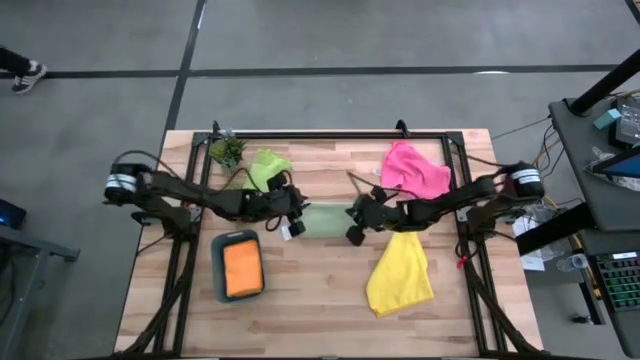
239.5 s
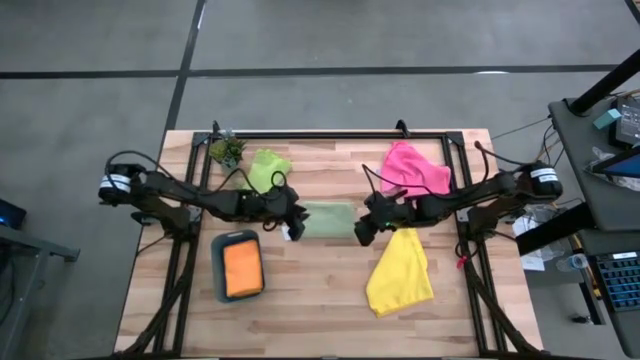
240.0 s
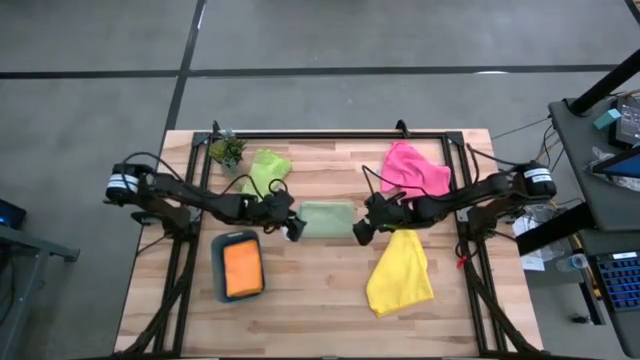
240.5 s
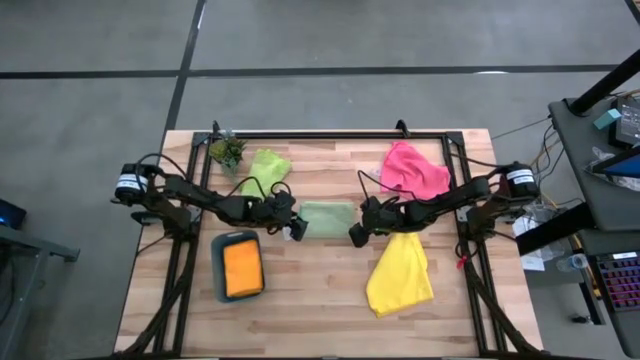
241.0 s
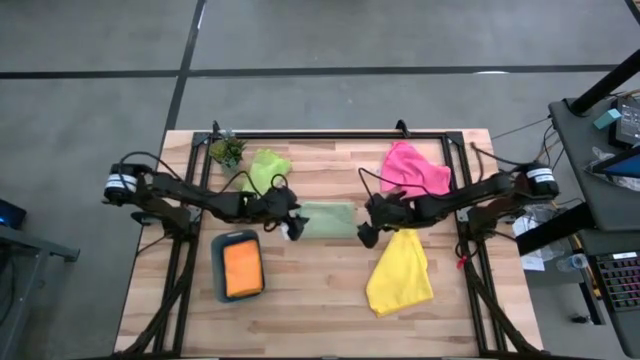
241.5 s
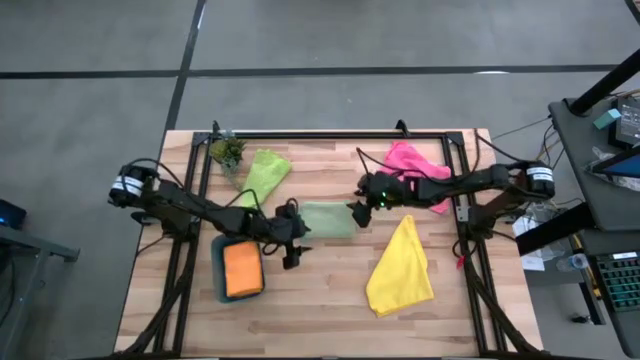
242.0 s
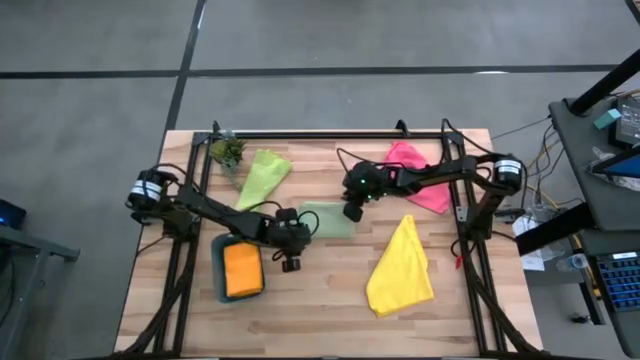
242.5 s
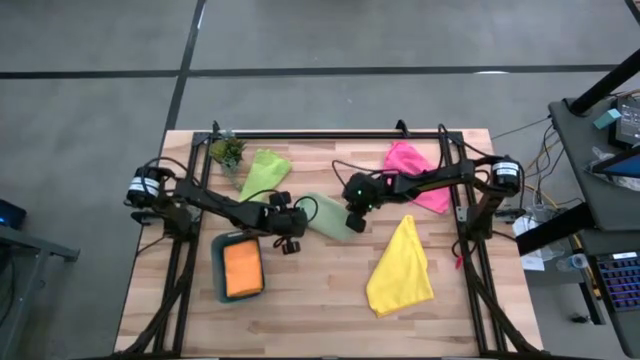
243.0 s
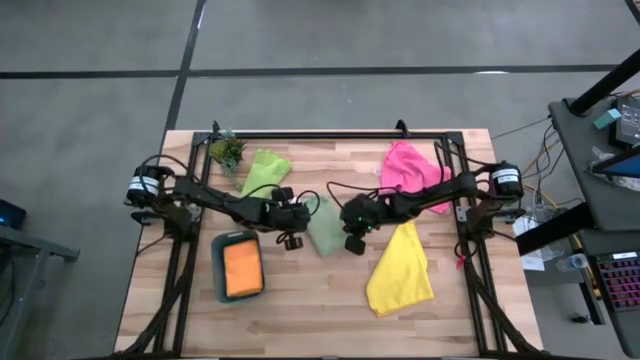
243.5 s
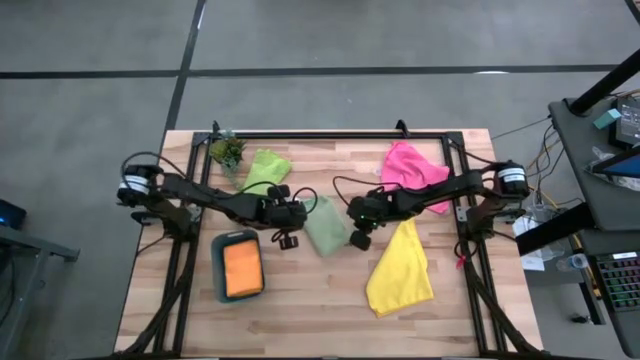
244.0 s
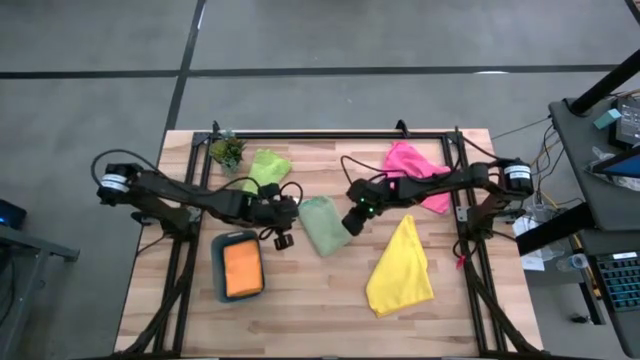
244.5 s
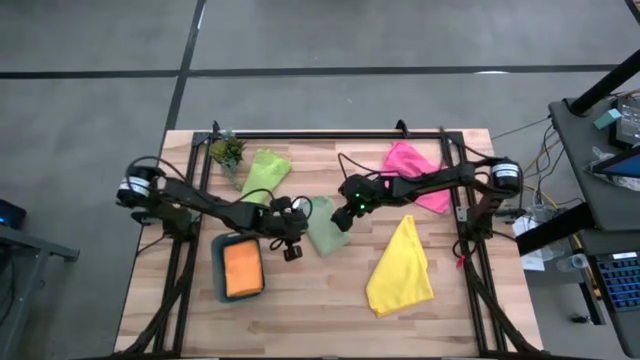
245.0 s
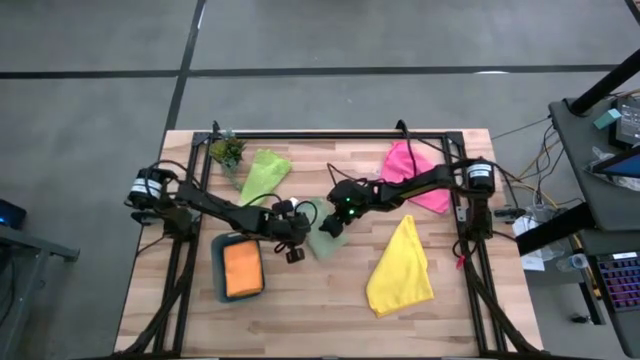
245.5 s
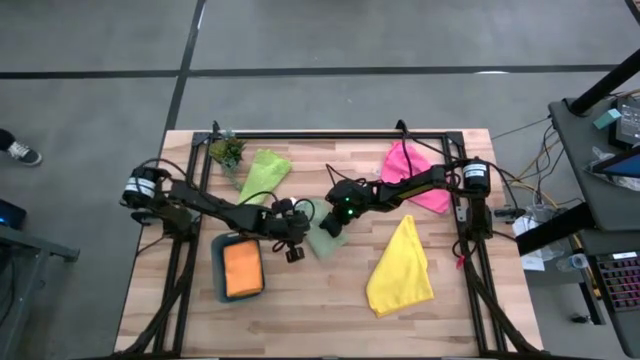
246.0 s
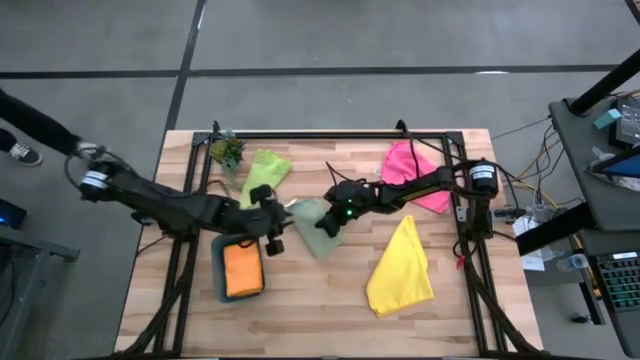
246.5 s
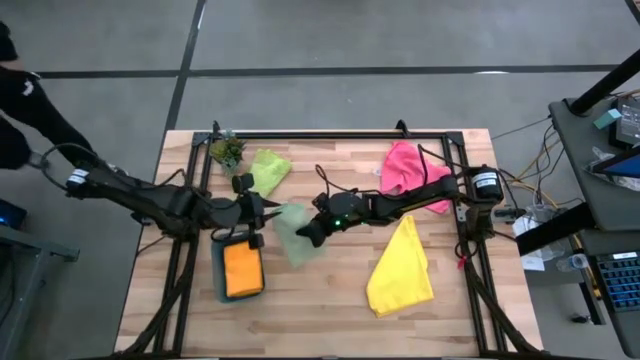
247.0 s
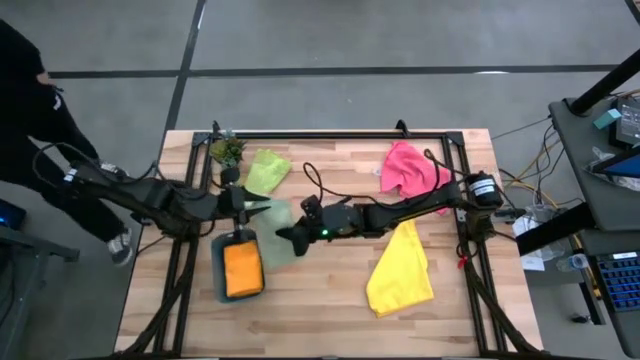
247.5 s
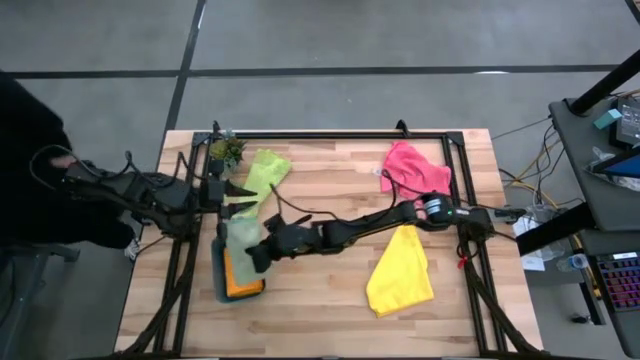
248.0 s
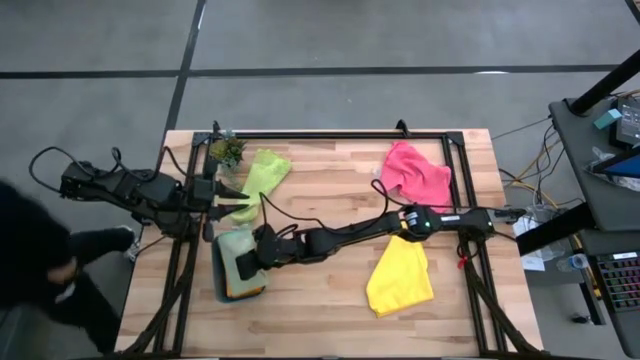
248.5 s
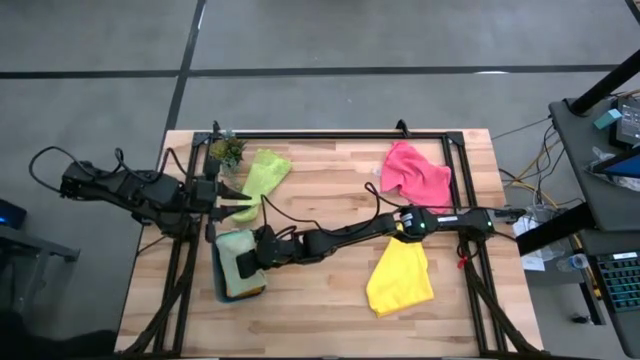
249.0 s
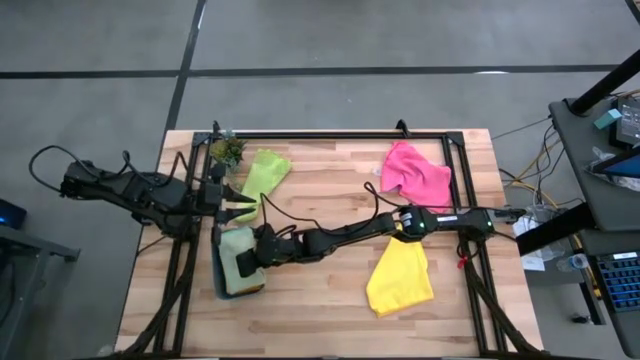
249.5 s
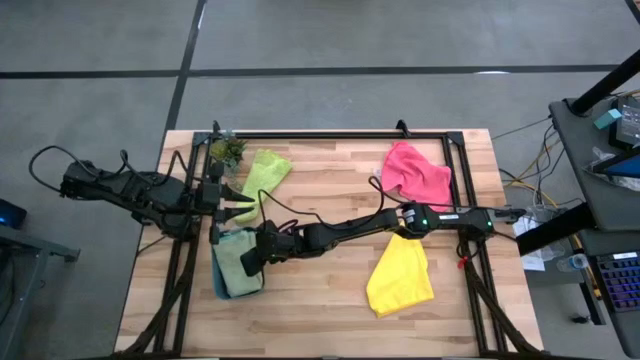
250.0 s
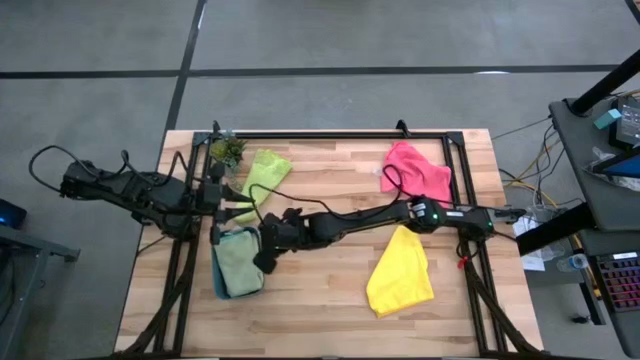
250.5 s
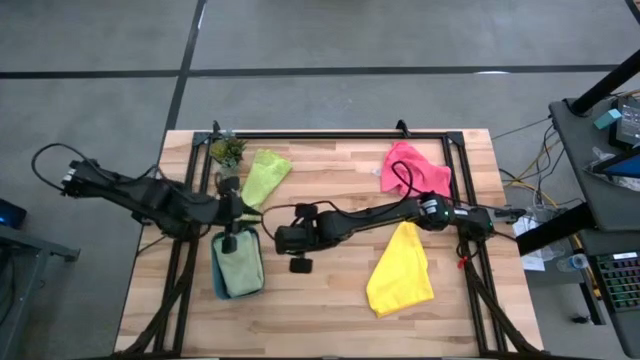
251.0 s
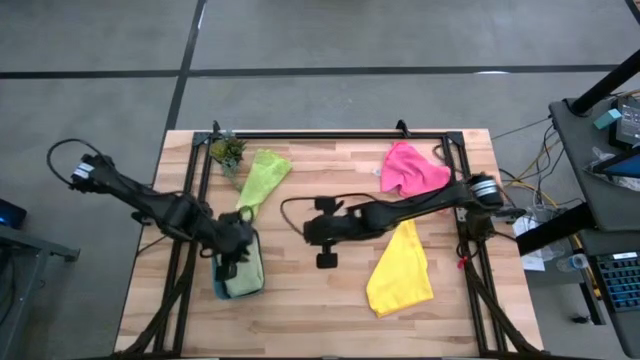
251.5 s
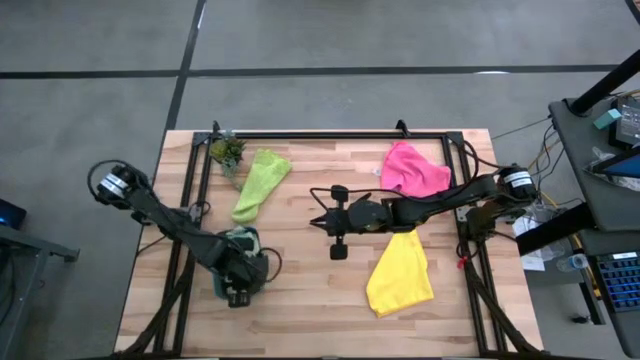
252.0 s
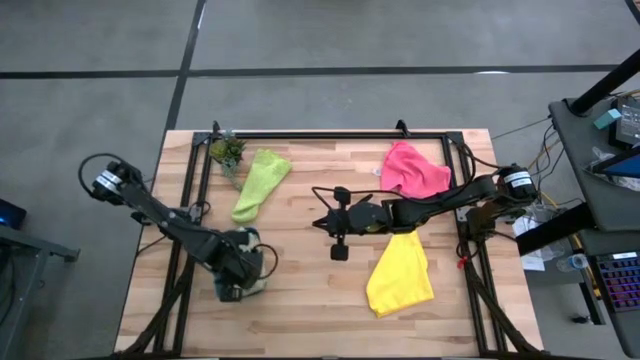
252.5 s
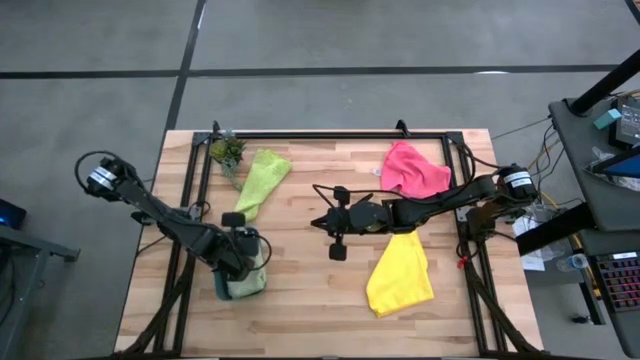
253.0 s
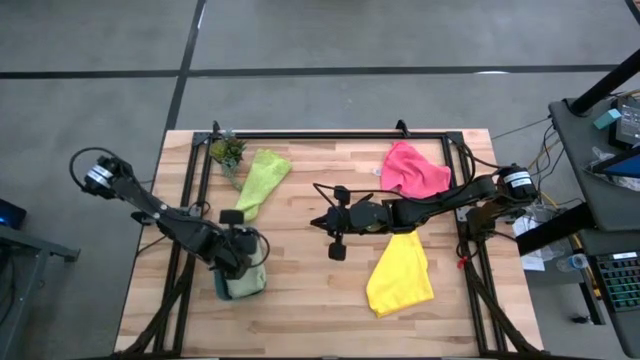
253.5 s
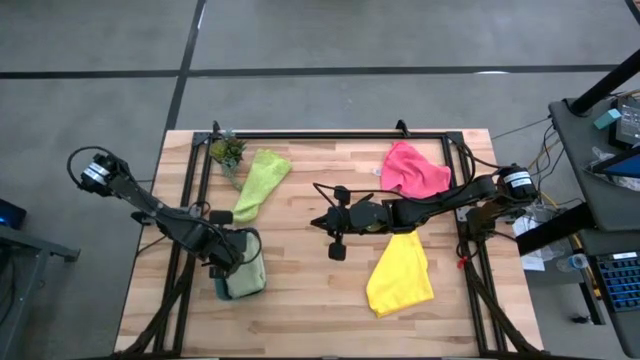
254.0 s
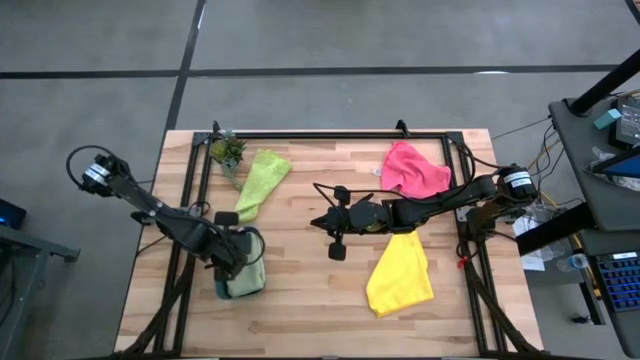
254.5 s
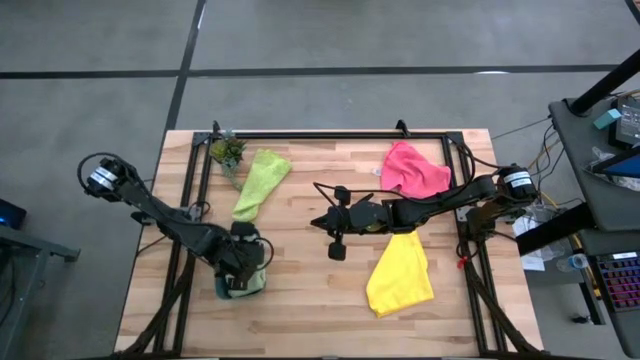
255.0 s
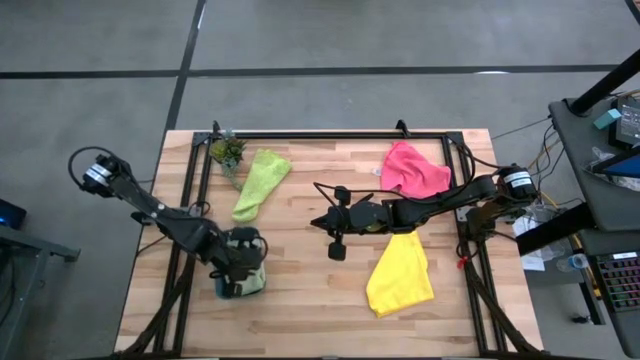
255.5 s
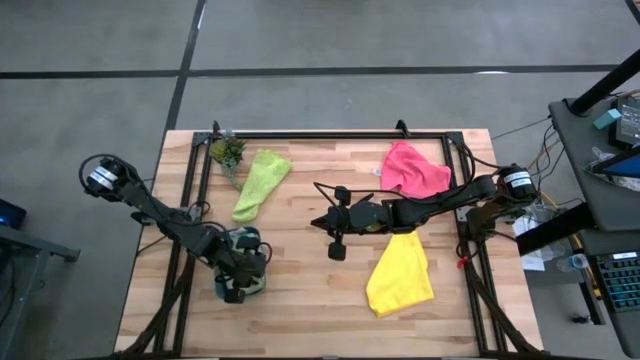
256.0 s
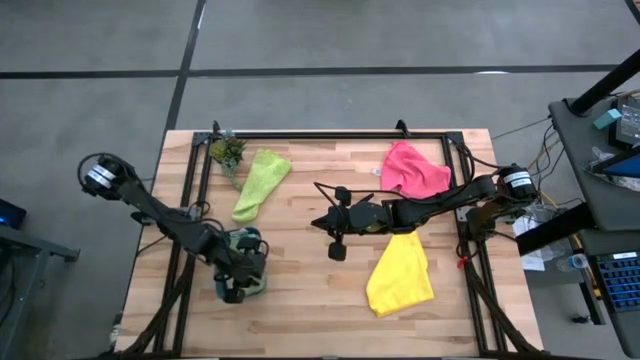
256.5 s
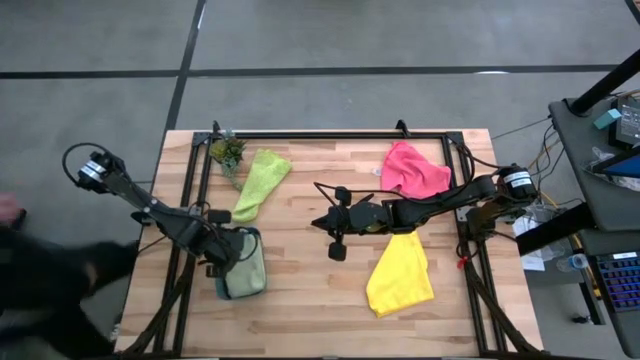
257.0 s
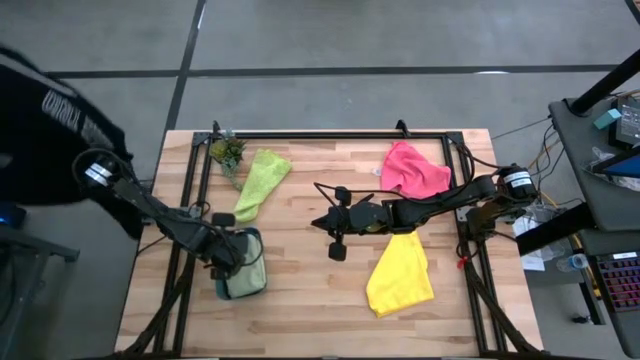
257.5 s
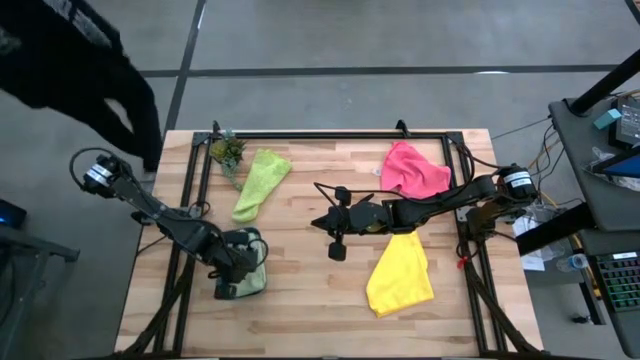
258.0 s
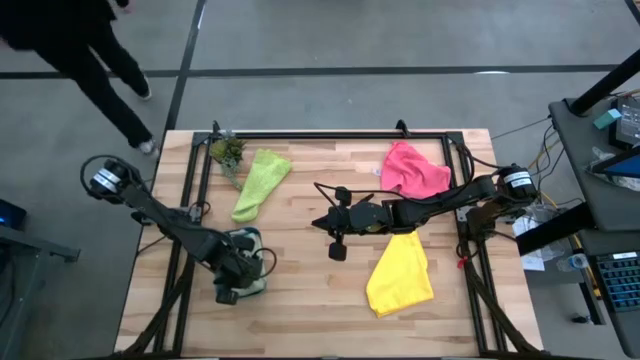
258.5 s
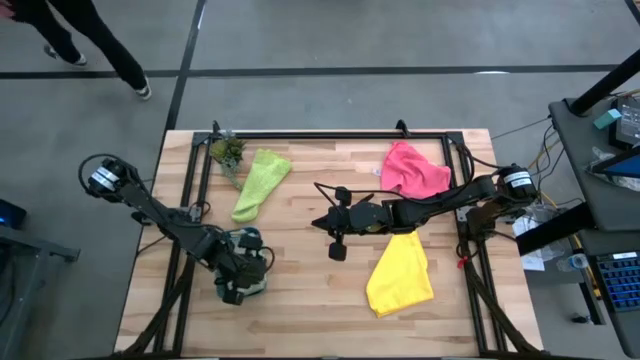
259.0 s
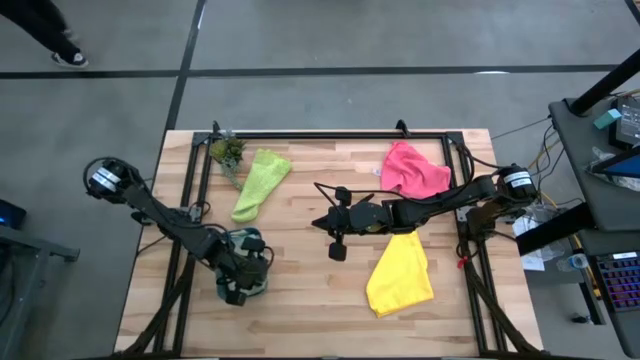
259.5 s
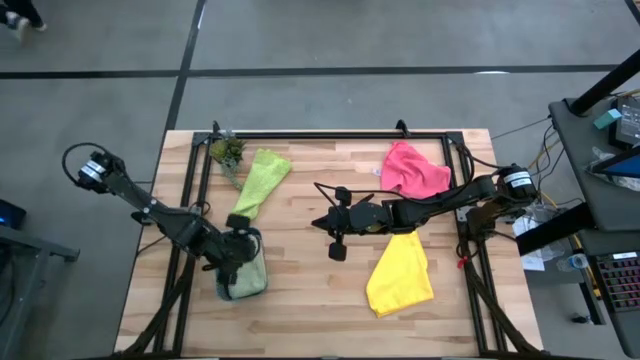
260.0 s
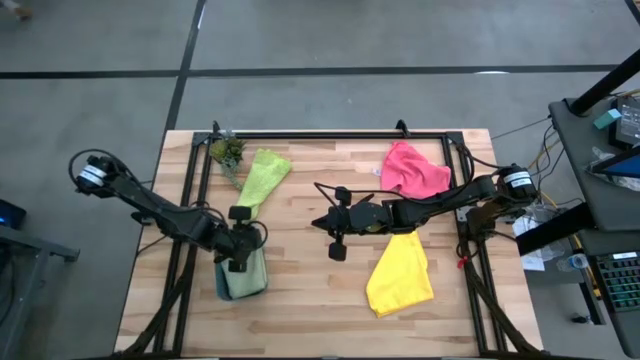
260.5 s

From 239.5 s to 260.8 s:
Task: Fold microfiber towels
Put the light green microfiber cloth into the blue bin
